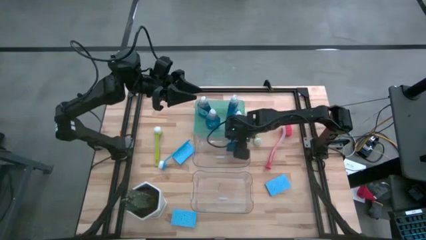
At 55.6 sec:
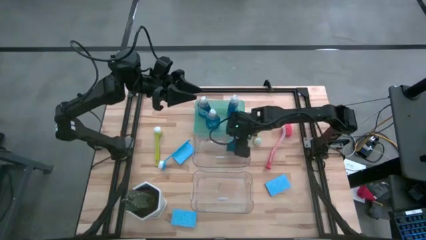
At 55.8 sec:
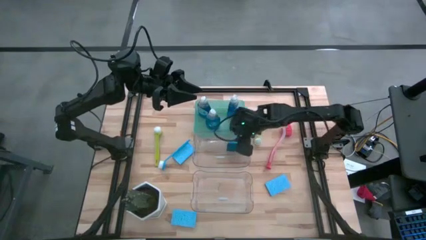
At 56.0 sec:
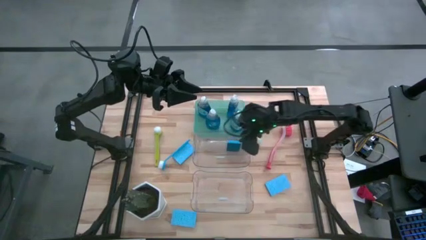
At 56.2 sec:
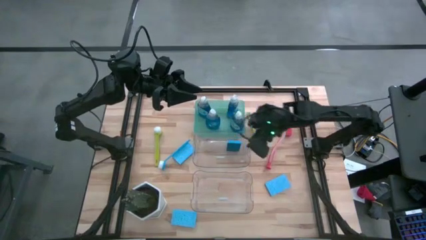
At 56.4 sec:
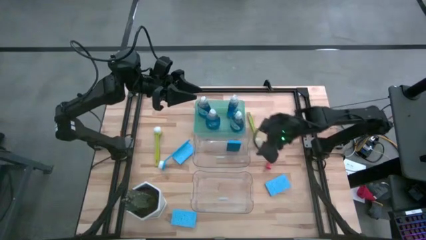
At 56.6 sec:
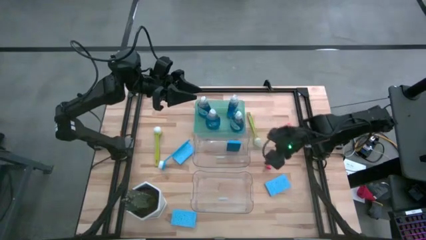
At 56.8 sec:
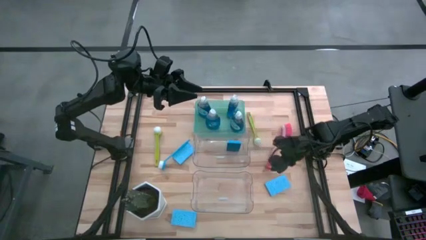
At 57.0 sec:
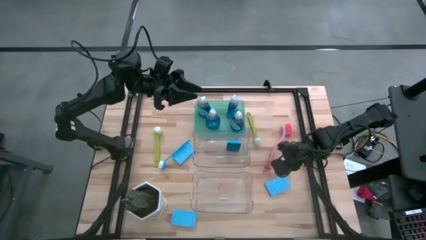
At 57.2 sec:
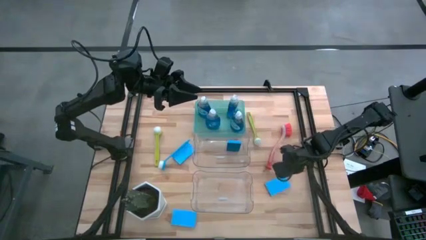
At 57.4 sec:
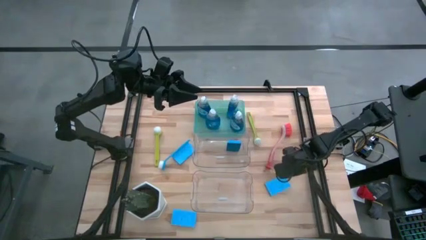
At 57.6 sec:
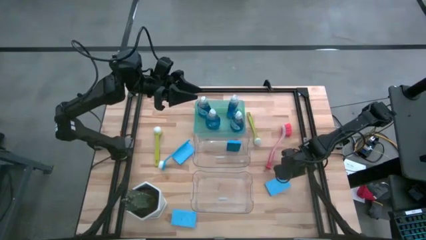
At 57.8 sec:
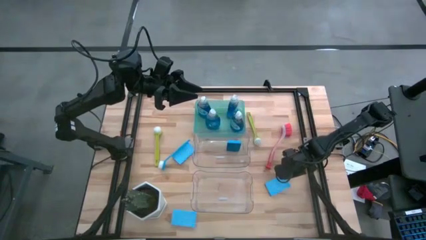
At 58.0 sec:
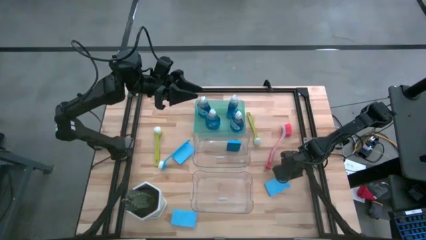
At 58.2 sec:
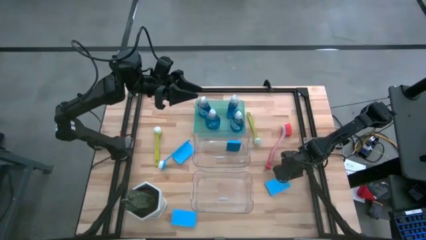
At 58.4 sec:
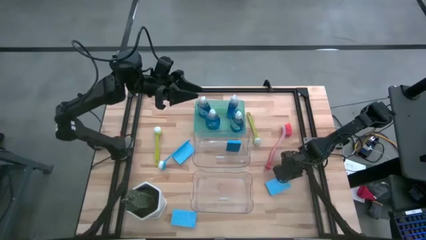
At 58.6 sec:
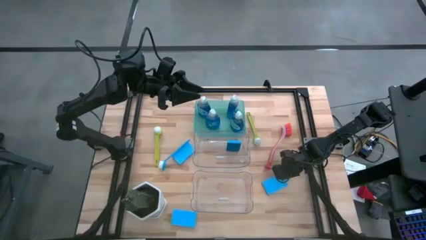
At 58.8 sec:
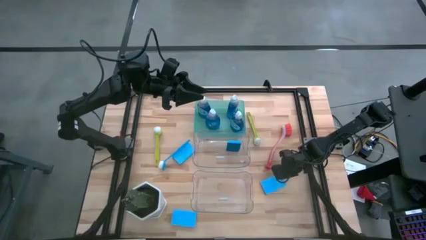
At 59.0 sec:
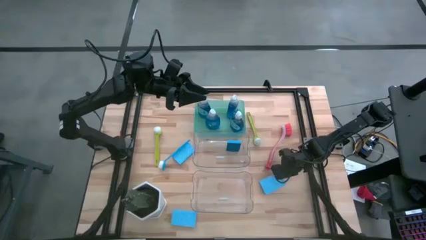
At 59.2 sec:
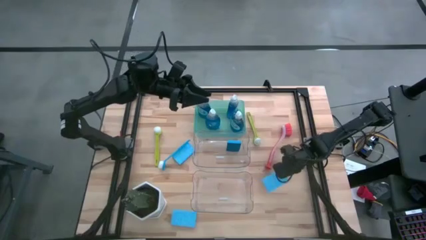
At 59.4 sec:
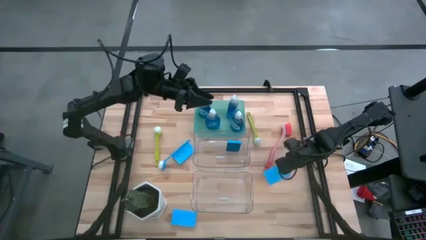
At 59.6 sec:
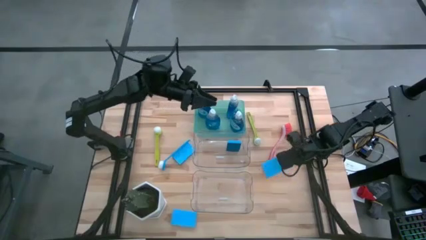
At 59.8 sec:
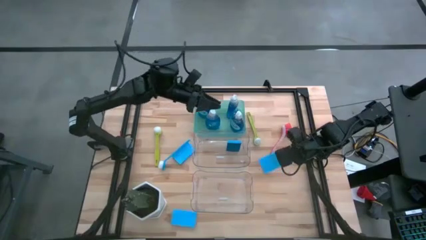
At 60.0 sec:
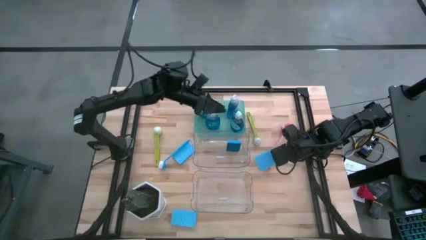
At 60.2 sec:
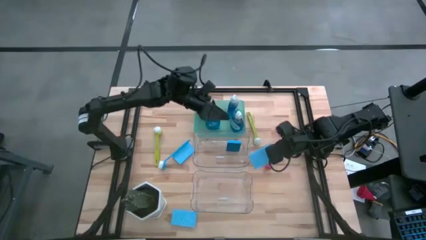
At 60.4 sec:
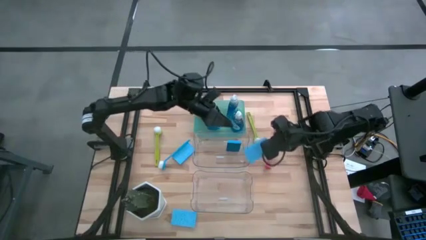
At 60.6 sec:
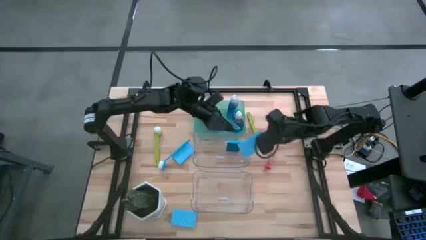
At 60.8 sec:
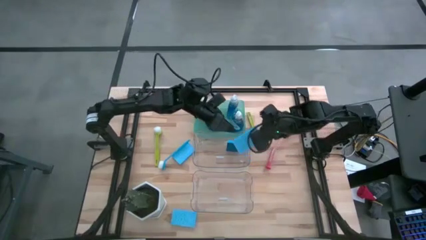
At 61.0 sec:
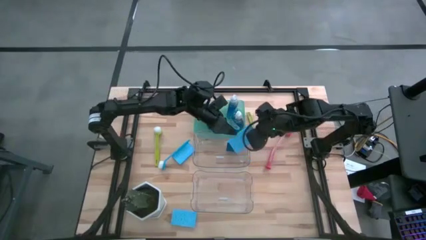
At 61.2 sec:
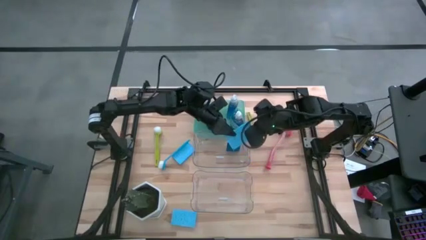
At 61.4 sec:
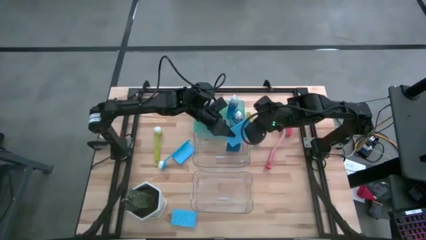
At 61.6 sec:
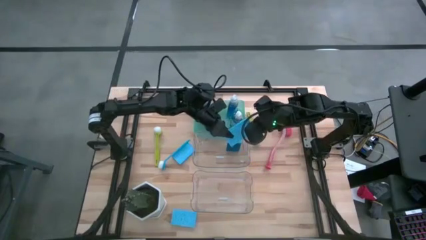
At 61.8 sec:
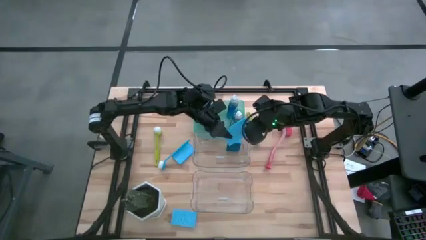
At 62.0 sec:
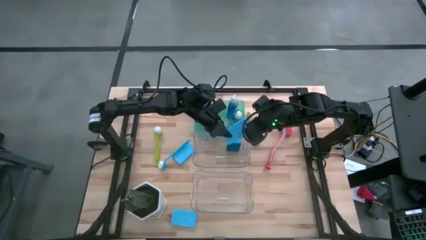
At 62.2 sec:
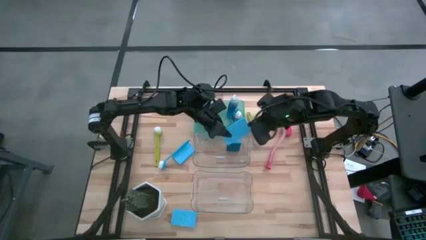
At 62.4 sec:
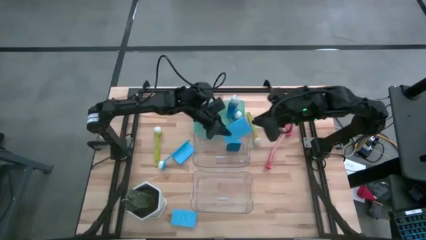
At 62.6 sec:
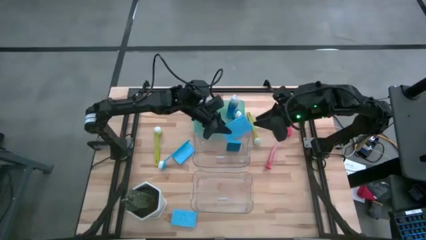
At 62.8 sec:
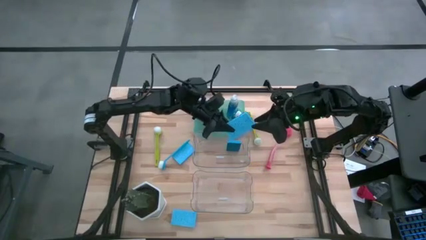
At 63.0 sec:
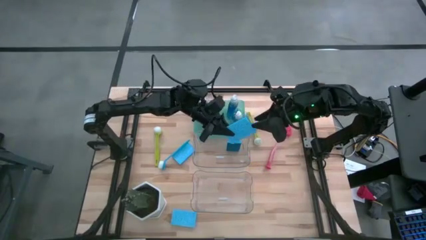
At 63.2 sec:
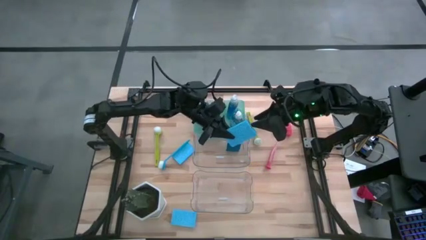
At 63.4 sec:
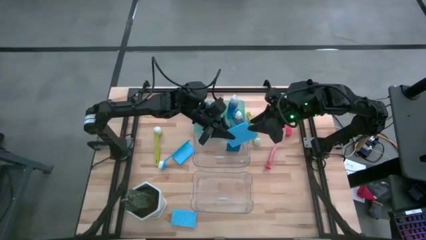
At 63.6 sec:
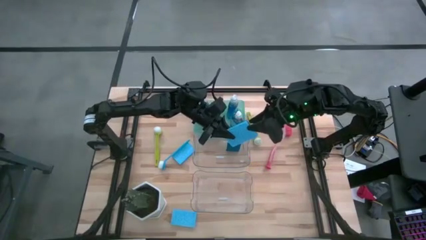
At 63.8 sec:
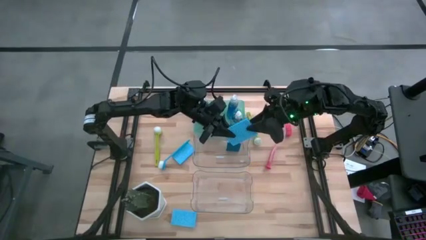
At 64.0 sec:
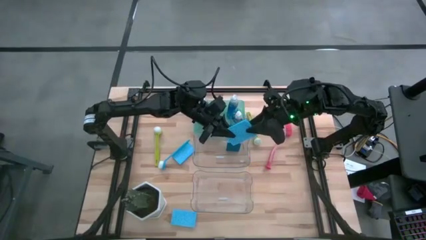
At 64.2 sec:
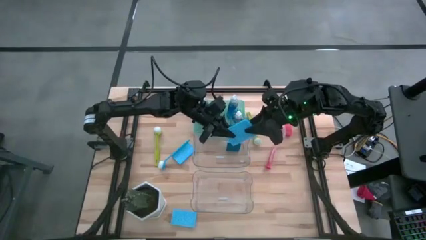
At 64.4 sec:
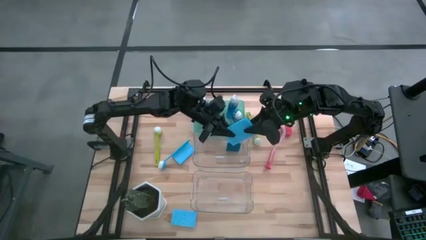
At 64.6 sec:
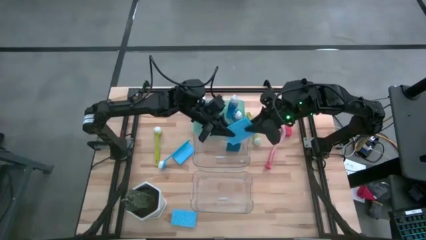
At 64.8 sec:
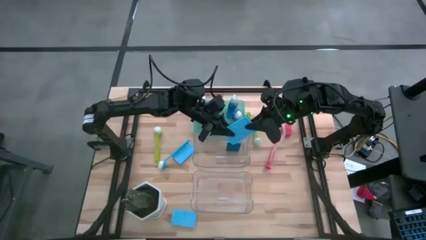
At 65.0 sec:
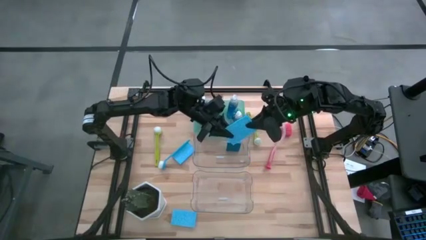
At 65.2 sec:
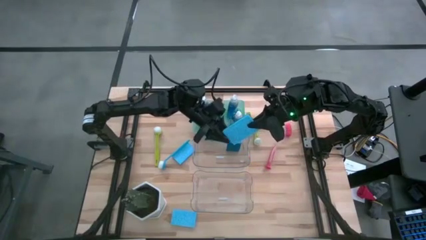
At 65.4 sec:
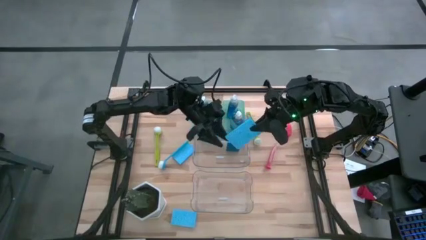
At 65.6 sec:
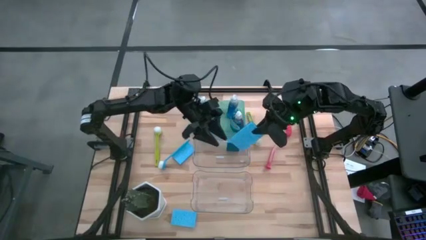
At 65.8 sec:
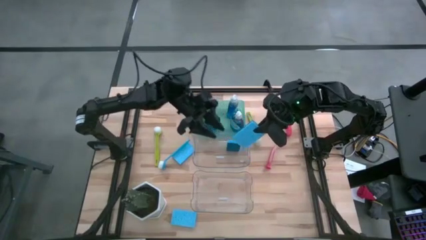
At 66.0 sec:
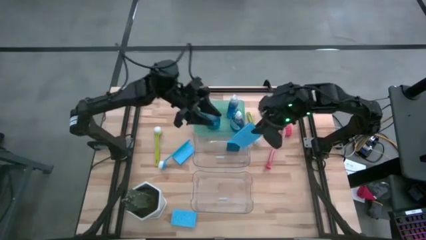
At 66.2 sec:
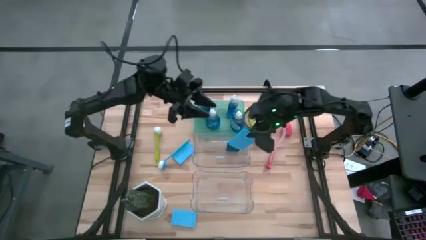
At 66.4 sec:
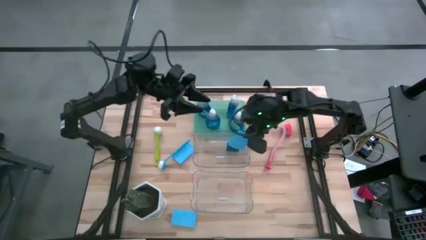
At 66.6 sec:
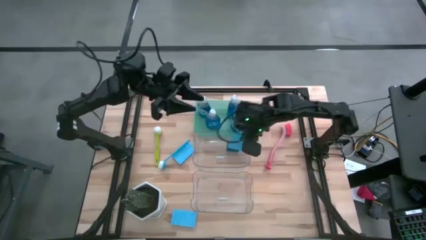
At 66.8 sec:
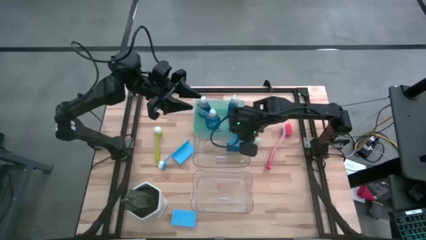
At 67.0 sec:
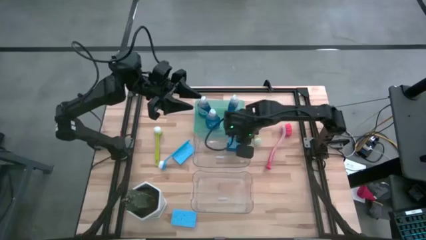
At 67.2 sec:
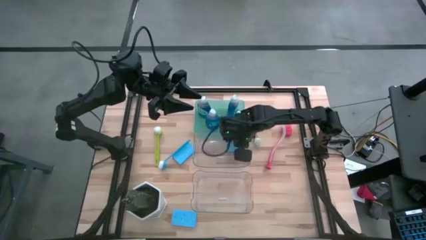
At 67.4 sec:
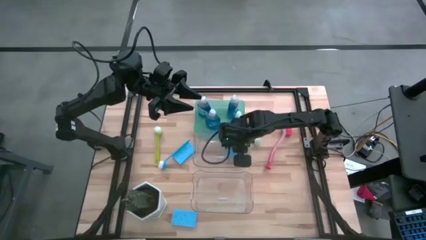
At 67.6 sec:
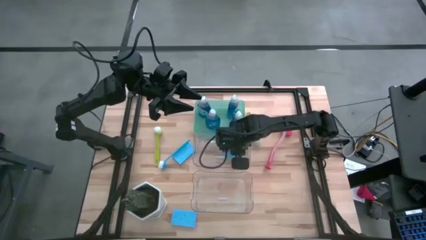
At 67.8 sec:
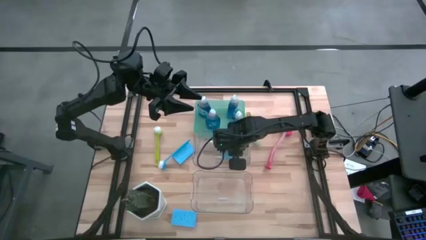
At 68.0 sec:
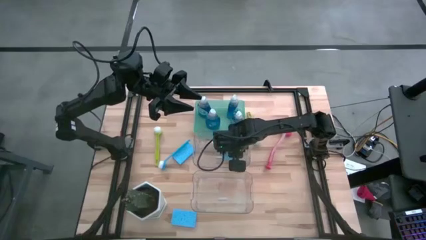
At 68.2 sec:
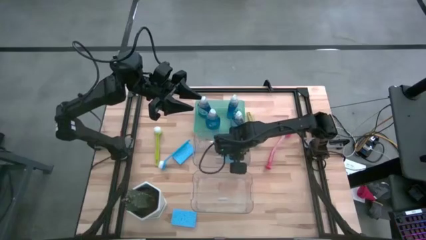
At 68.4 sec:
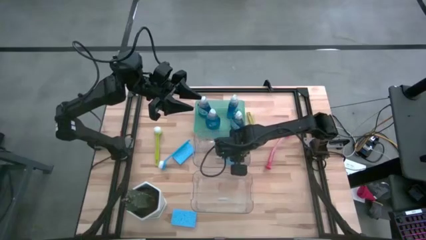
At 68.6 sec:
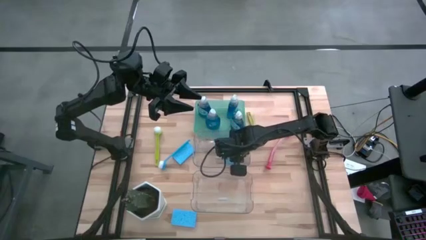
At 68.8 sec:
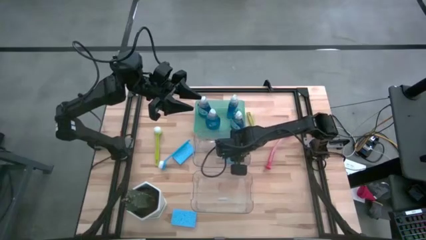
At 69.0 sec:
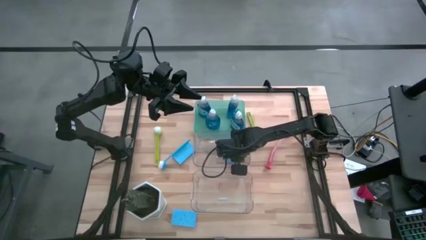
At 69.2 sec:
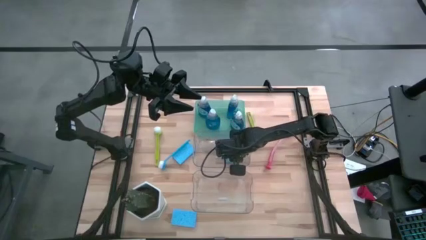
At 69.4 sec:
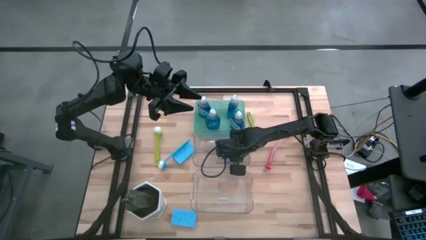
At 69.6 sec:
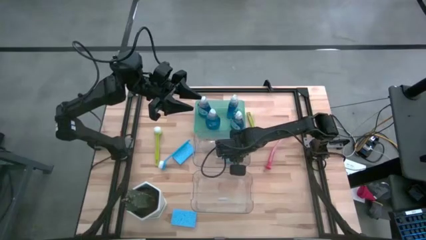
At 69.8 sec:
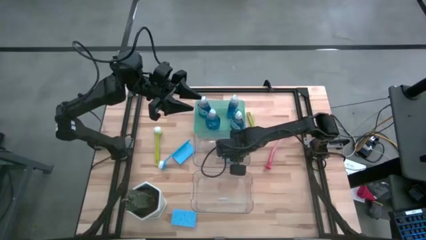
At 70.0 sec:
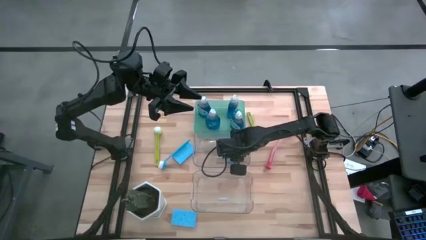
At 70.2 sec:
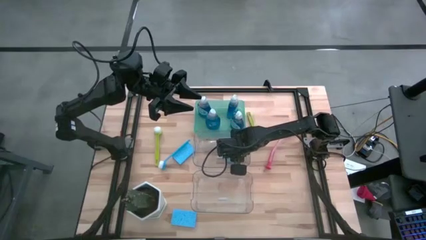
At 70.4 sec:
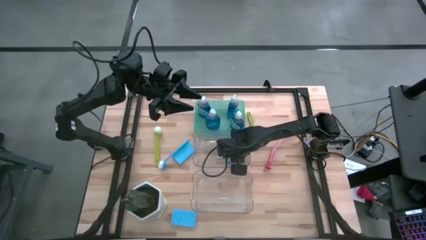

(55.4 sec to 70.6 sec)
Task: Pick & Place Kitchen Sink Supplies
Put the blue sponge into the top transparent bin
